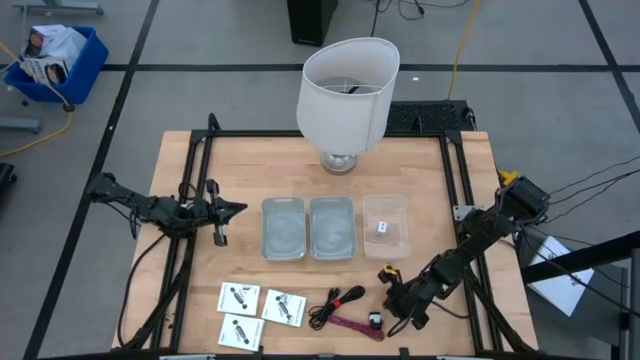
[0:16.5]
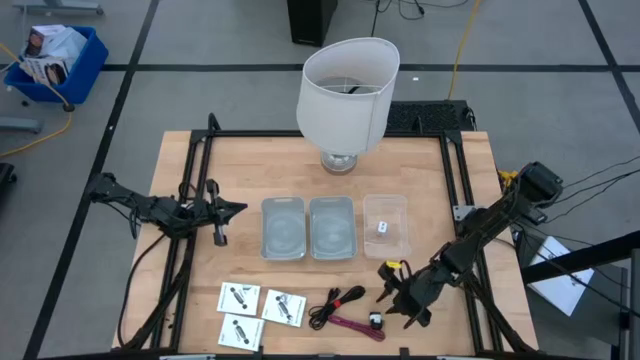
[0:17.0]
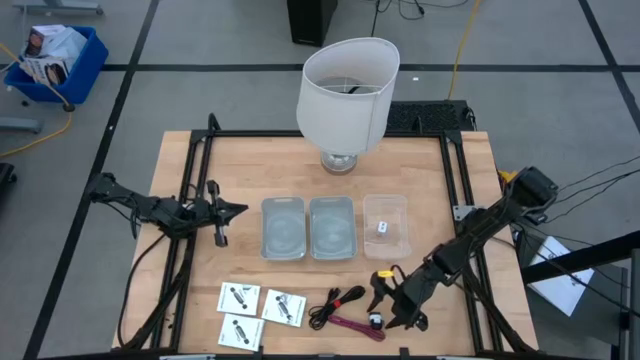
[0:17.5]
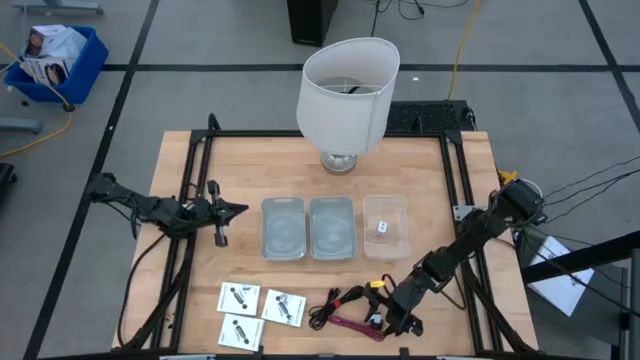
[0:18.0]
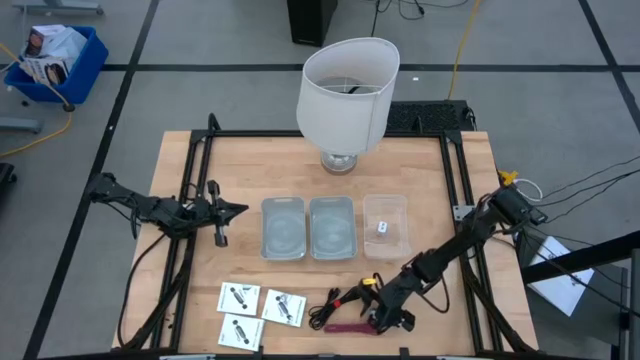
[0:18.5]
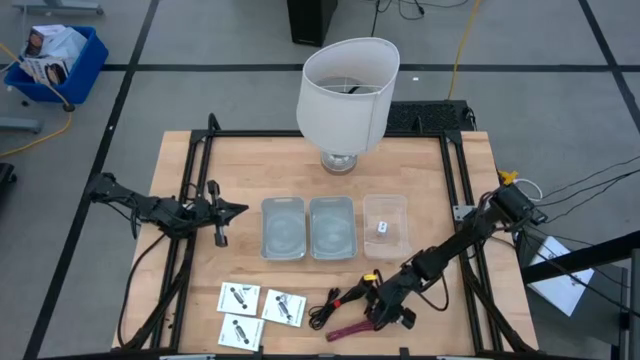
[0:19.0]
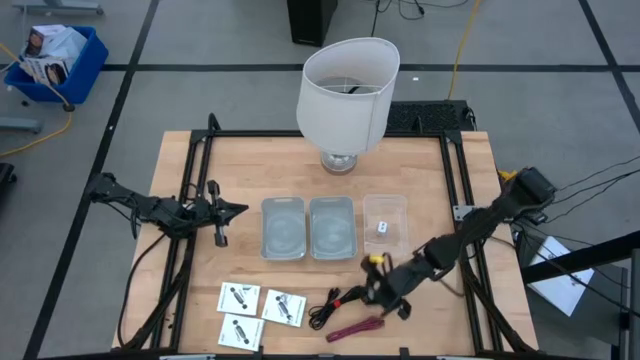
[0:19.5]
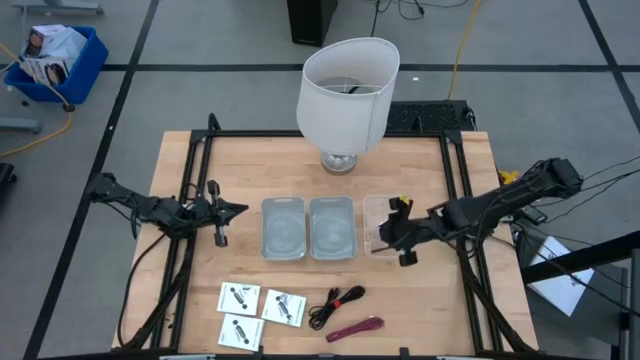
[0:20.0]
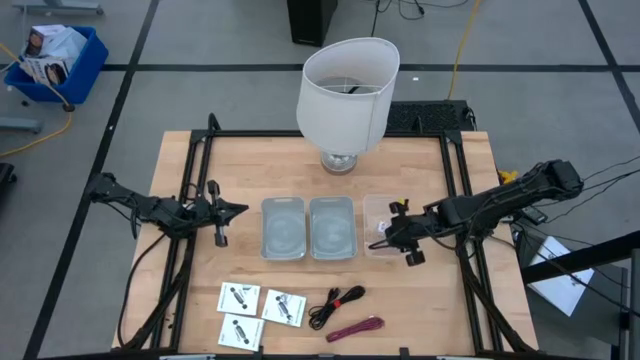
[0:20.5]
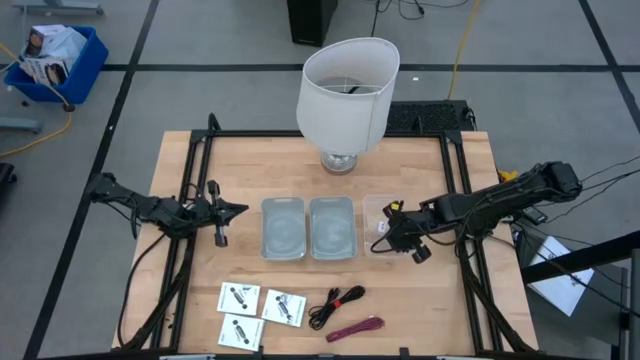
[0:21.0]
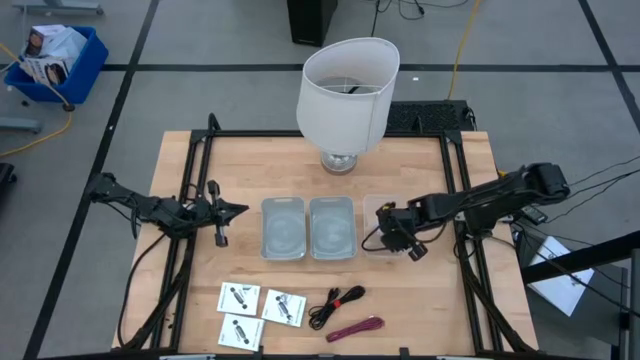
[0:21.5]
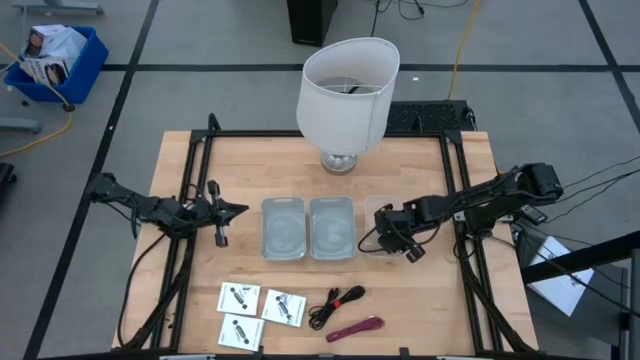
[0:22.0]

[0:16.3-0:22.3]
Task: Pick and place items into bin
Put the black charger adapter into the transparent bin

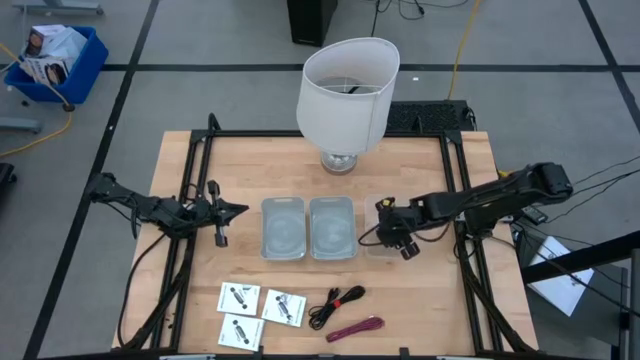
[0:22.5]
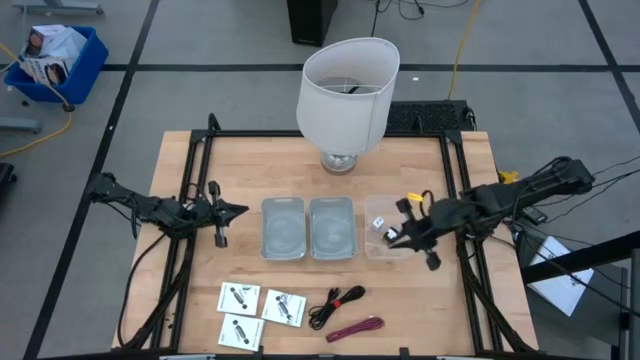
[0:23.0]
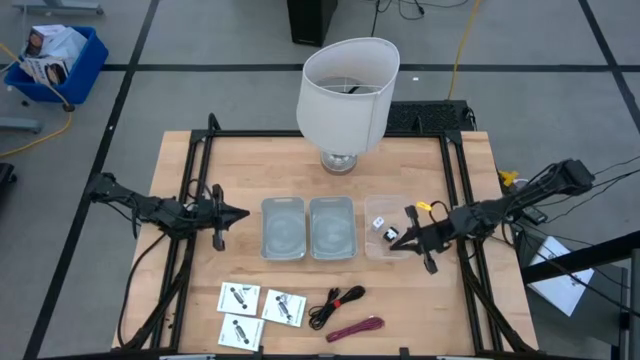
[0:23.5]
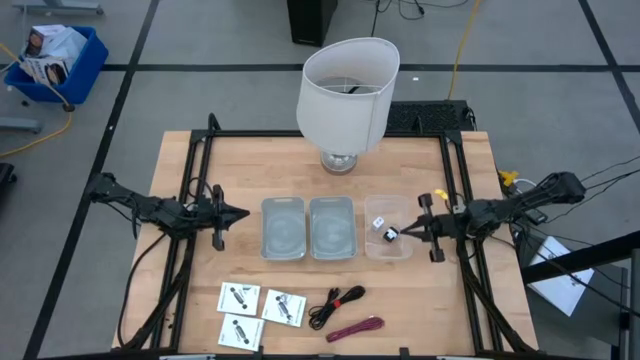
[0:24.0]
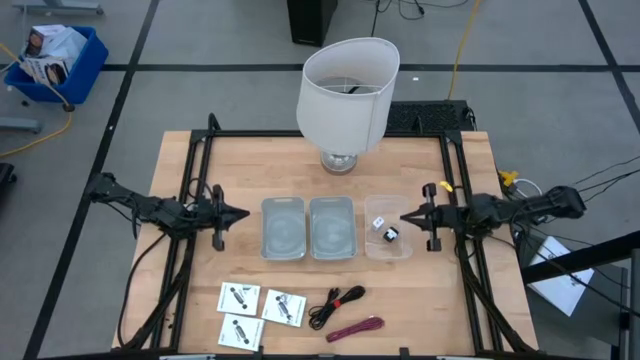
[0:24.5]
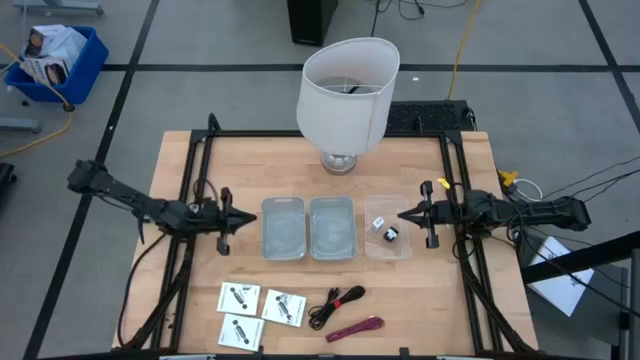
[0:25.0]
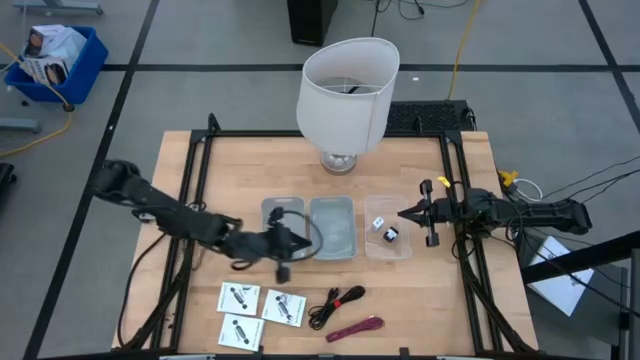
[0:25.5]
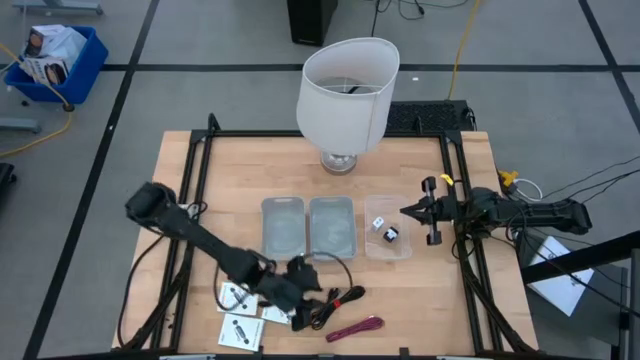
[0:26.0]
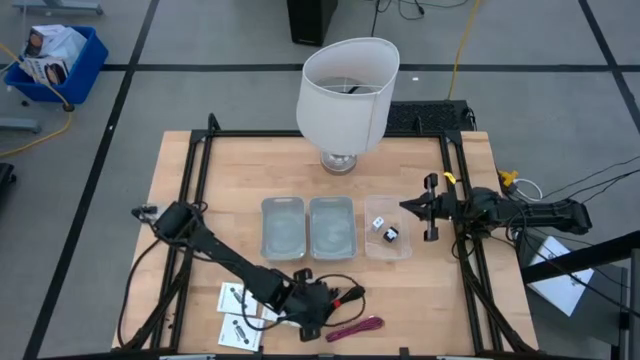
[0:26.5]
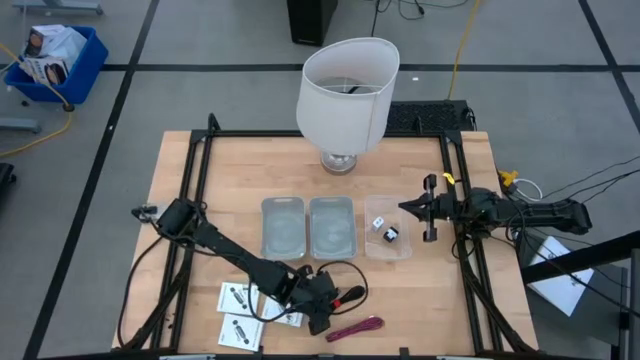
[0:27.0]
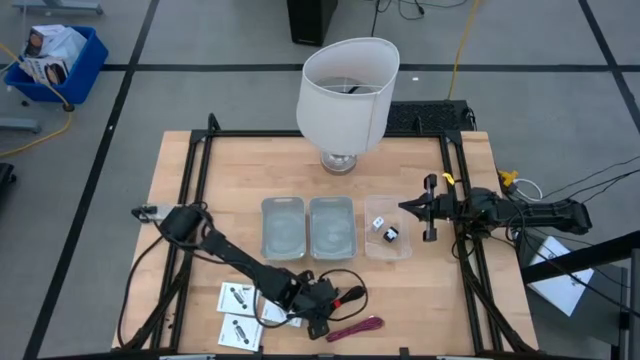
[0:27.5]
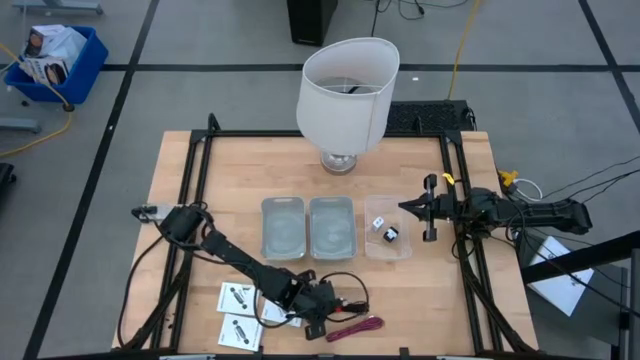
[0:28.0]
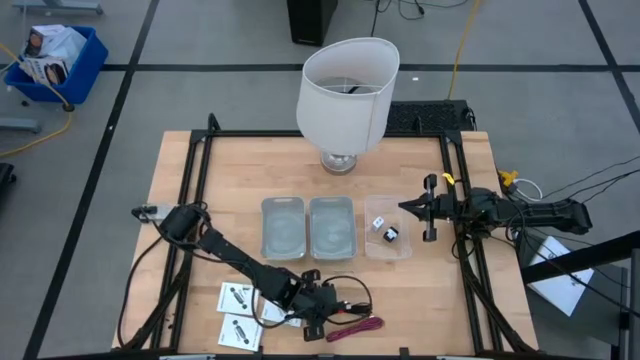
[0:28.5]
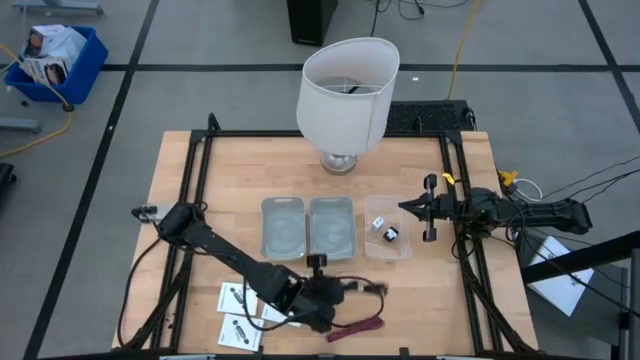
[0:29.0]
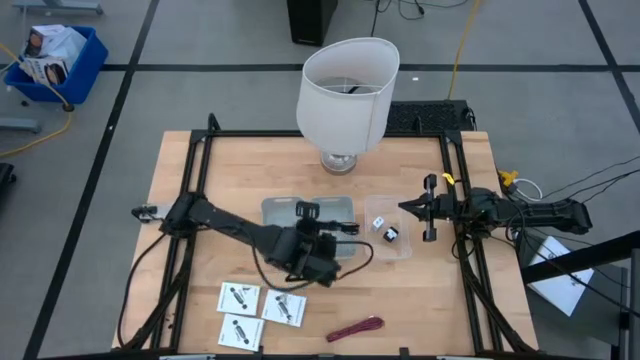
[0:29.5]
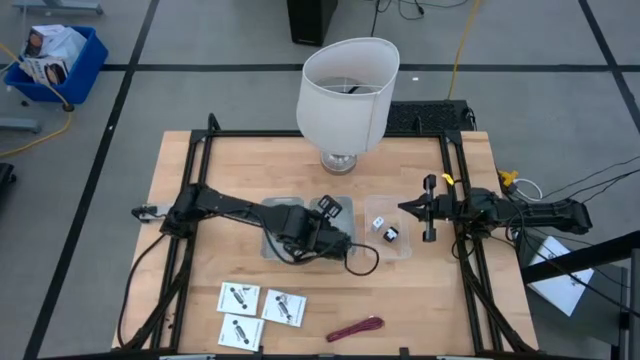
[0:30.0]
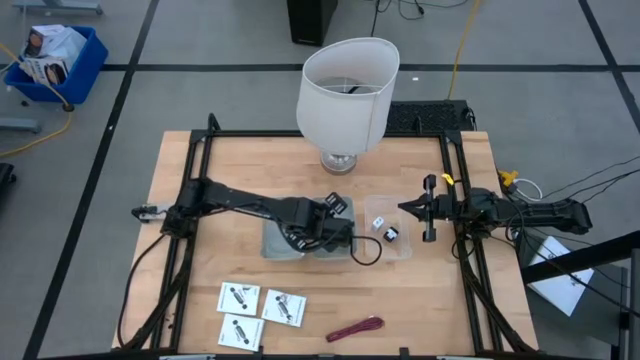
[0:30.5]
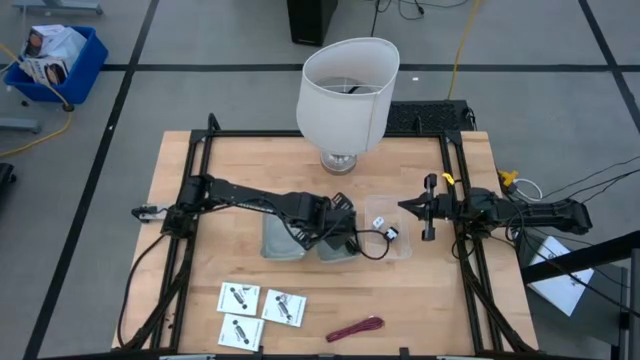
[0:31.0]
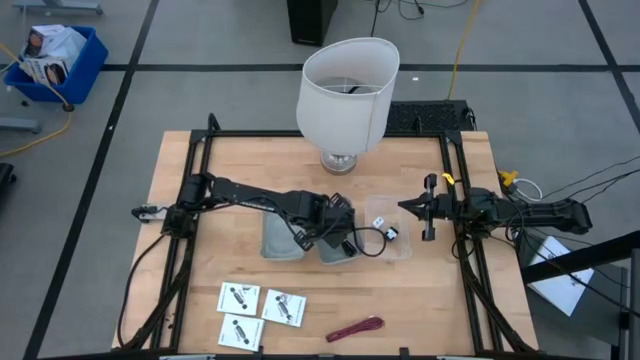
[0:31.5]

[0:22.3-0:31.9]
Put the black charger cable into the right gray bin

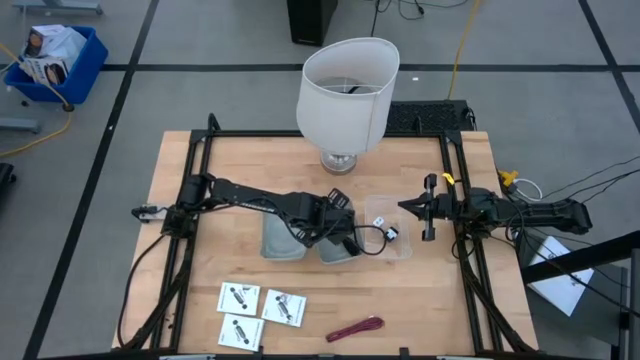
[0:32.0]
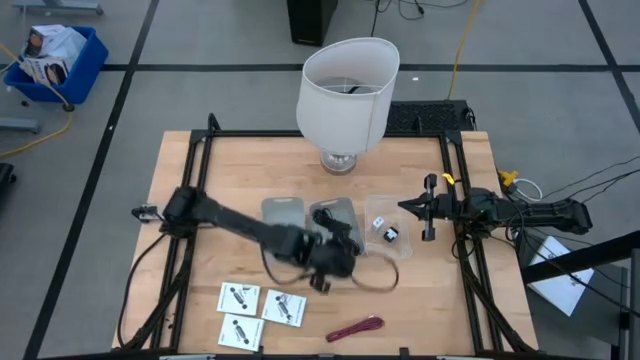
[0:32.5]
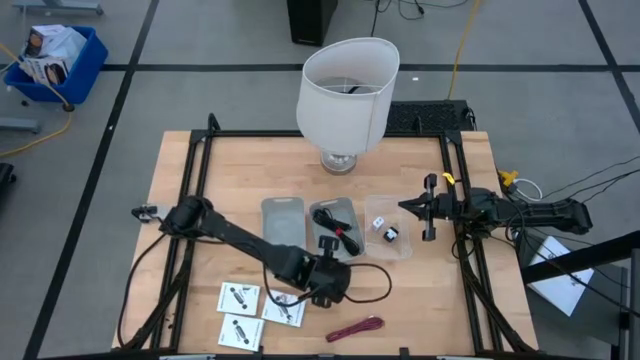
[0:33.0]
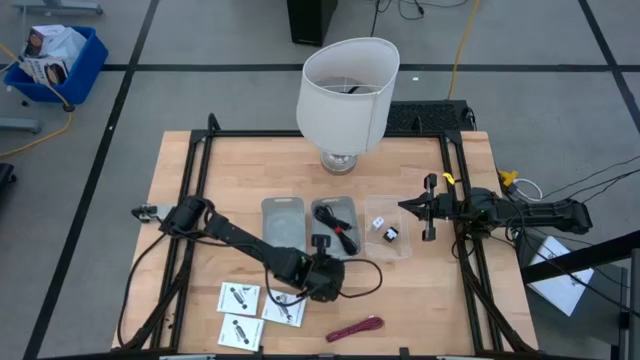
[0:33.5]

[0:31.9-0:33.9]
Adjust the right gray bin

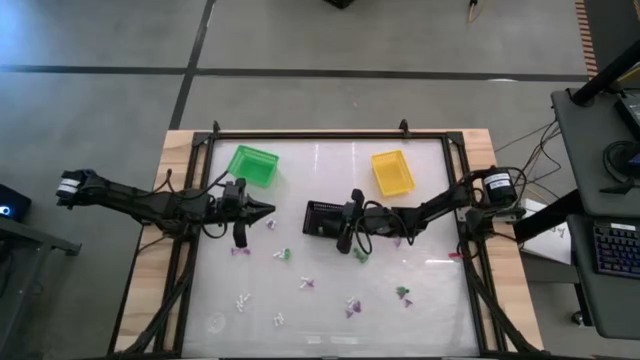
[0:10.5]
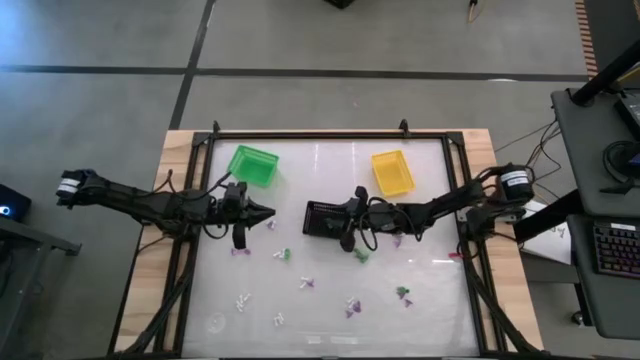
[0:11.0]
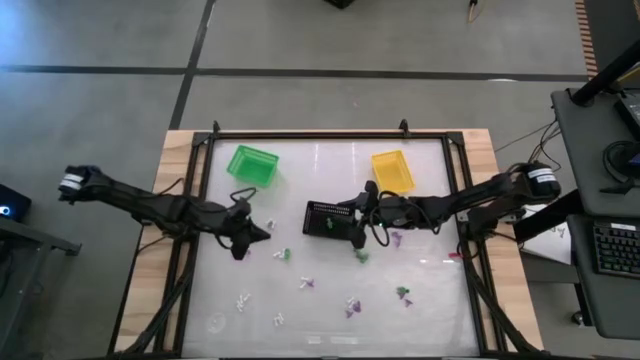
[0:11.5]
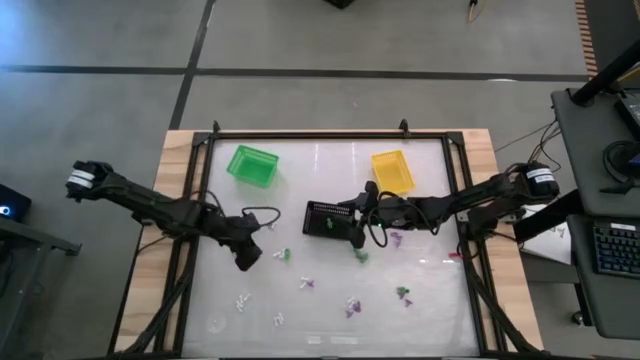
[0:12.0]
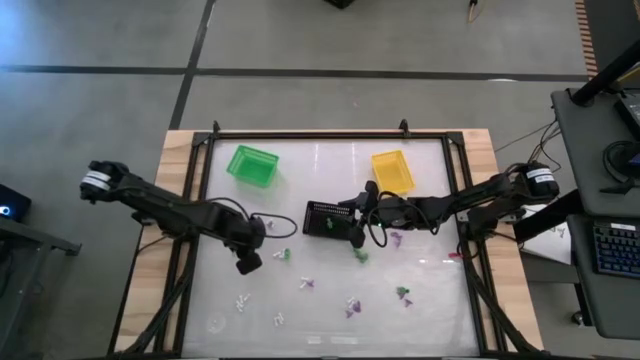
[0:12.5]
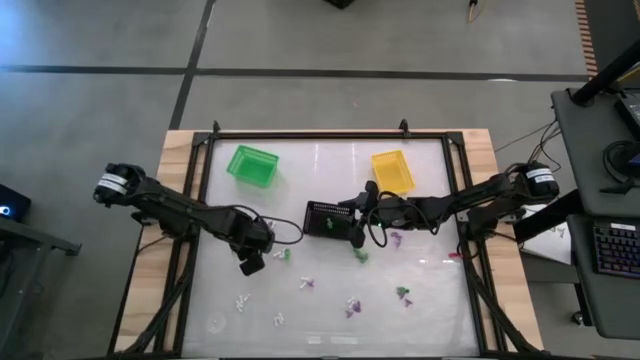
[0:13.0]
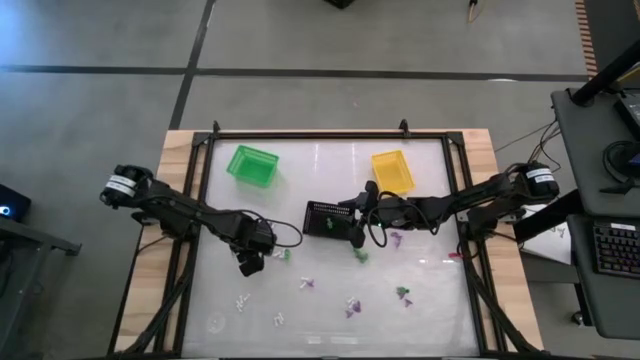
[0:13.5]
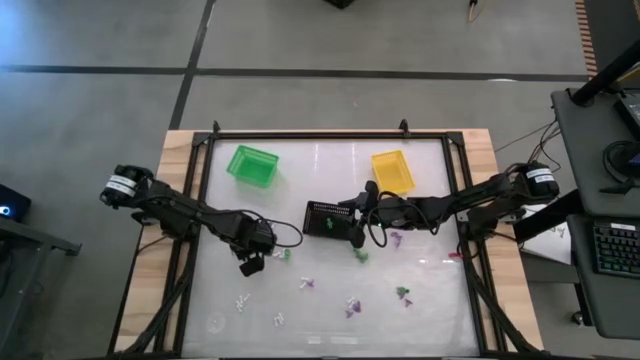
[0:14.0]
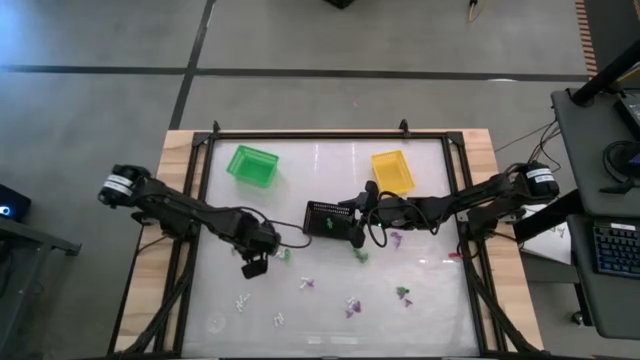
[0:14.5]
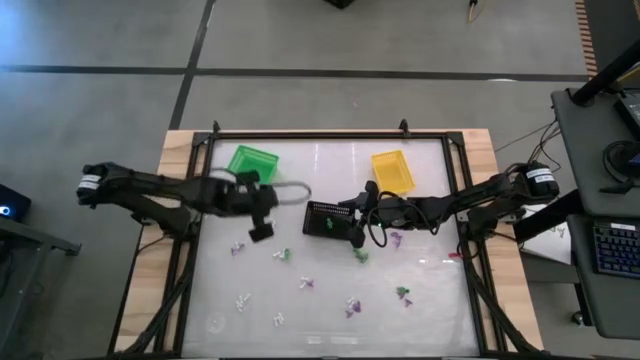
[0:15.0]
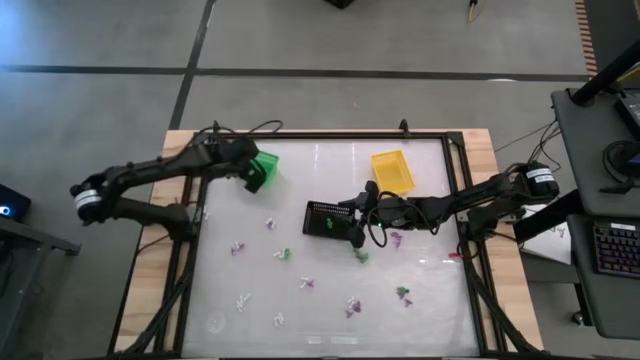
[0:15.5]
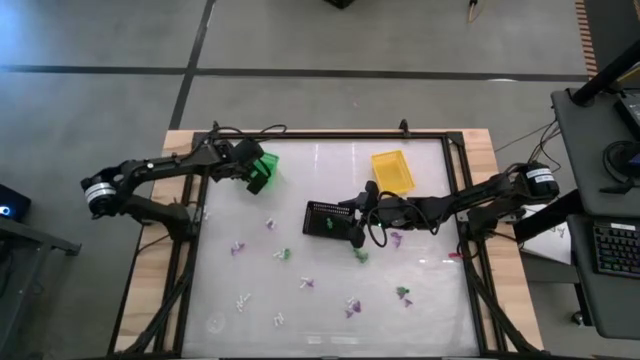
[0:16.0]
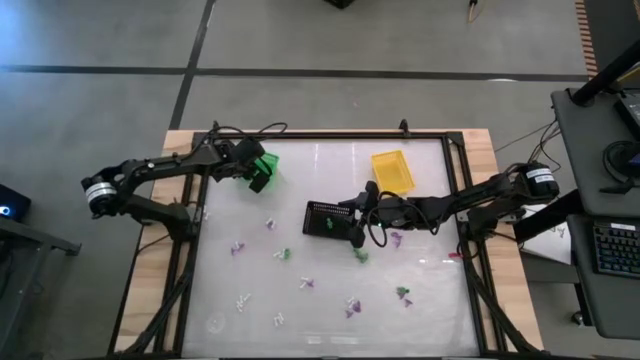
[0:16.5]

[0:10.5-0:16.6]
Task: Sort Halloween decoration
Put the purple witch hat toy into the green bin
